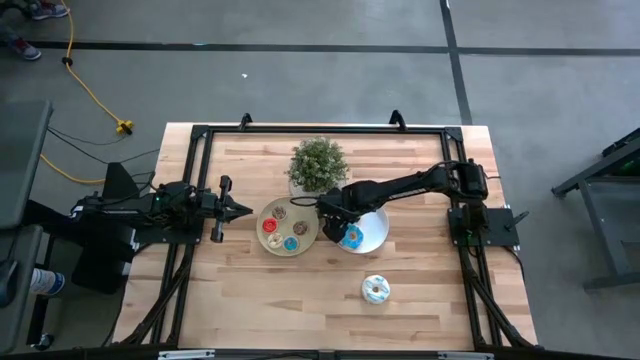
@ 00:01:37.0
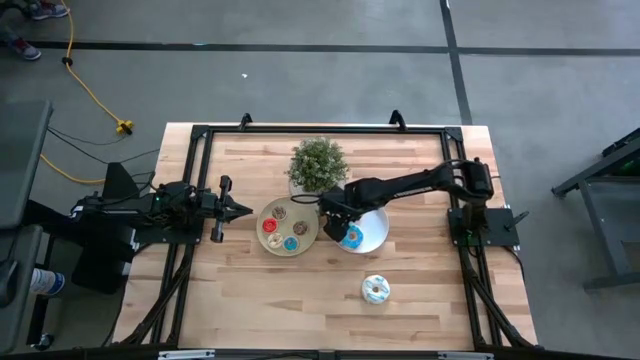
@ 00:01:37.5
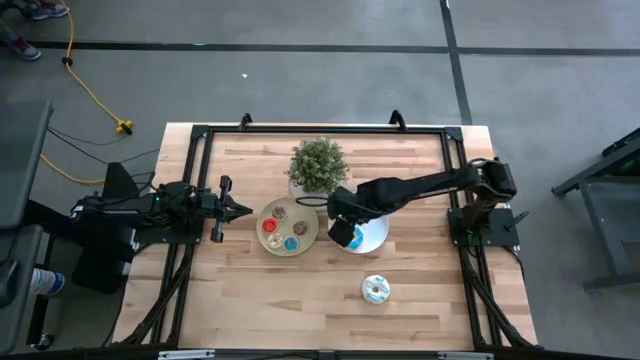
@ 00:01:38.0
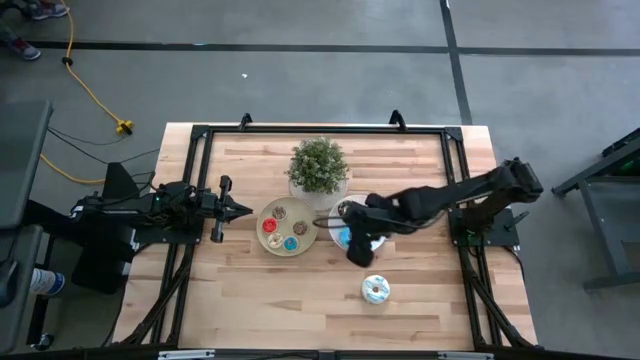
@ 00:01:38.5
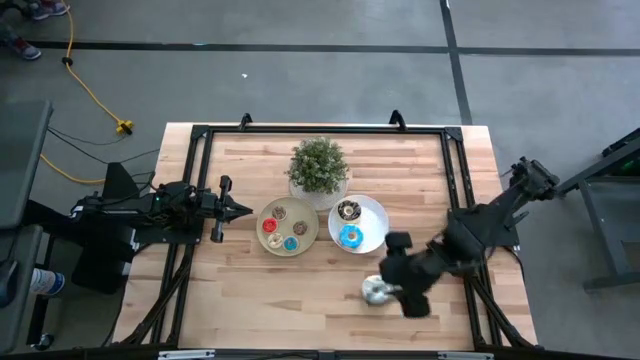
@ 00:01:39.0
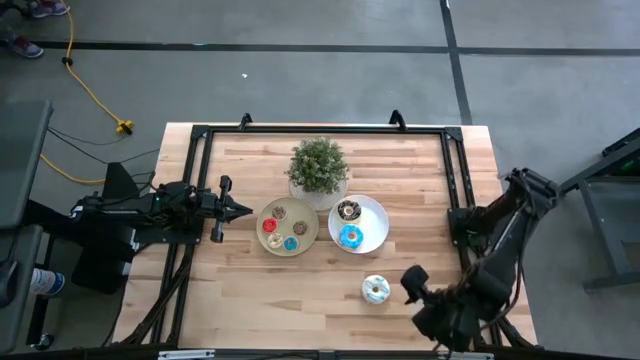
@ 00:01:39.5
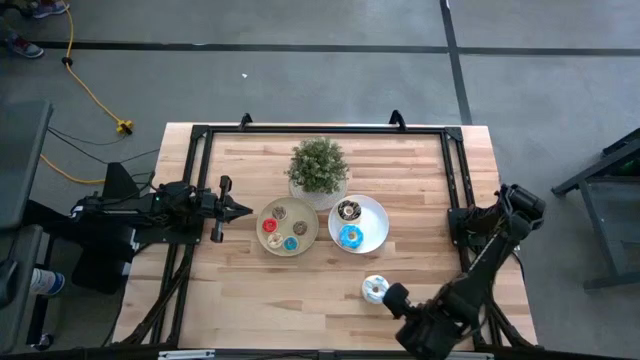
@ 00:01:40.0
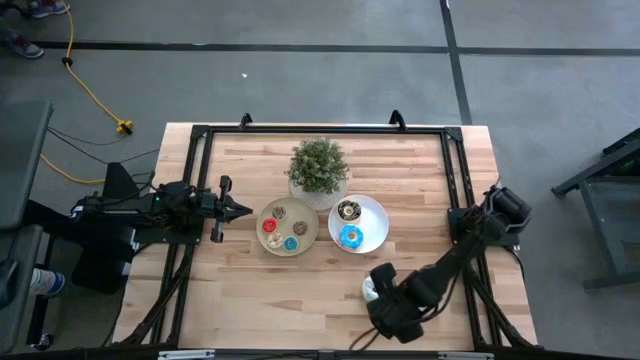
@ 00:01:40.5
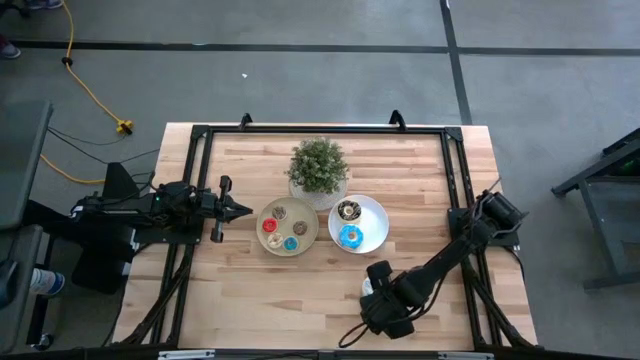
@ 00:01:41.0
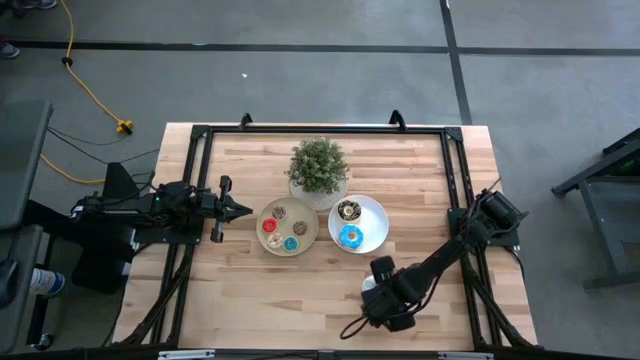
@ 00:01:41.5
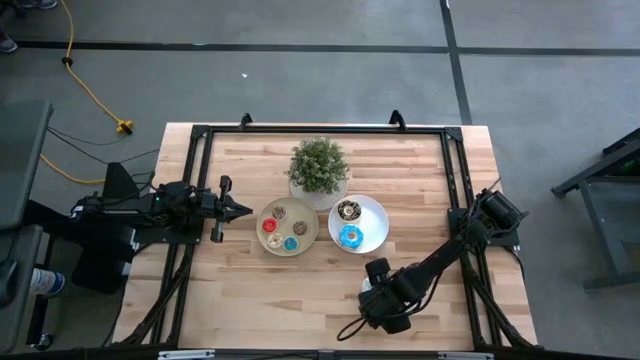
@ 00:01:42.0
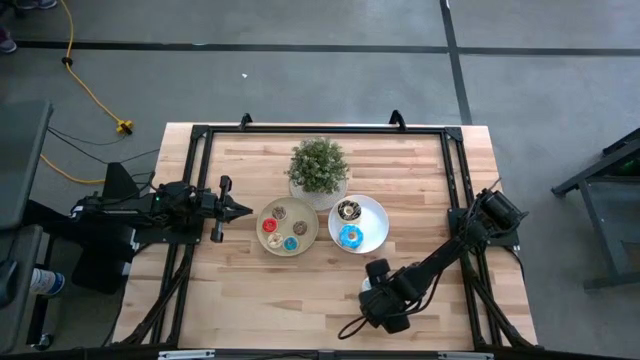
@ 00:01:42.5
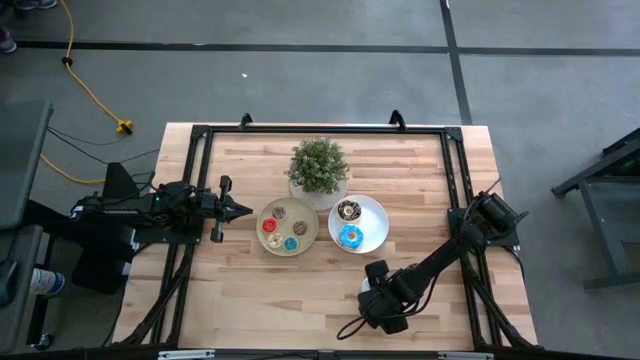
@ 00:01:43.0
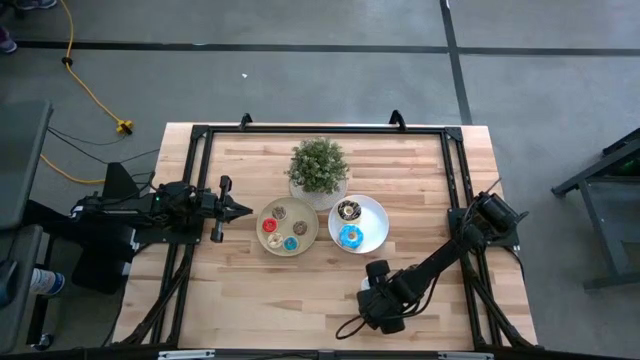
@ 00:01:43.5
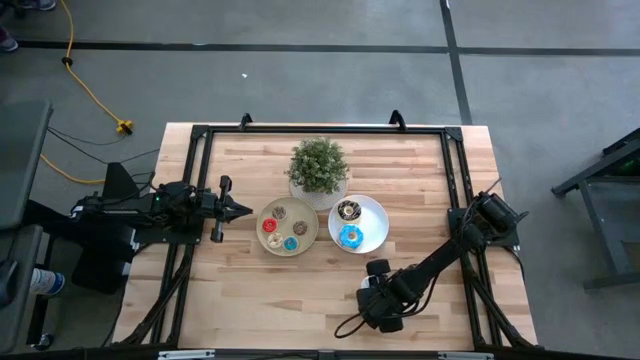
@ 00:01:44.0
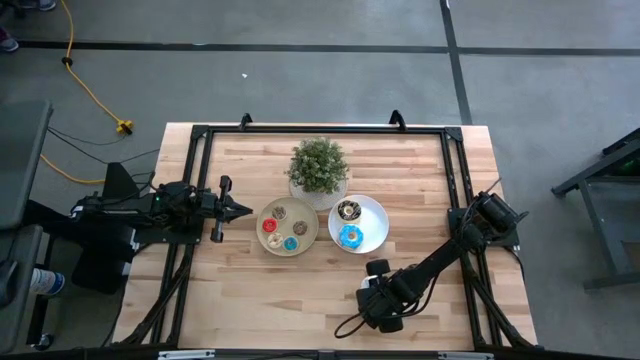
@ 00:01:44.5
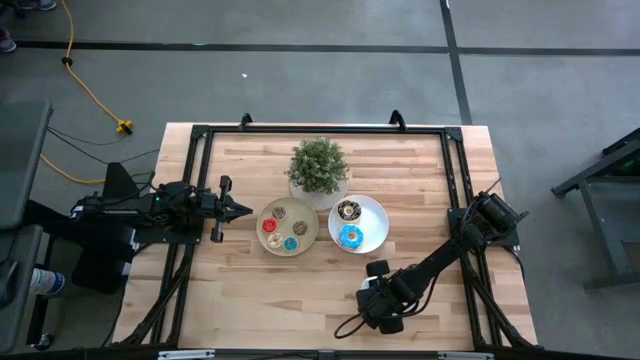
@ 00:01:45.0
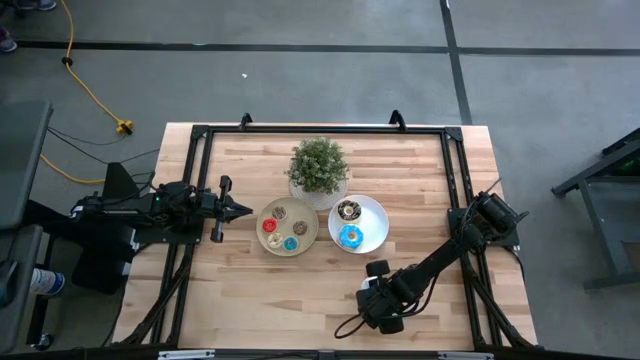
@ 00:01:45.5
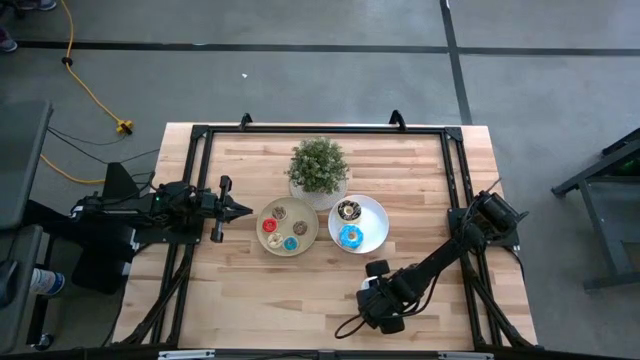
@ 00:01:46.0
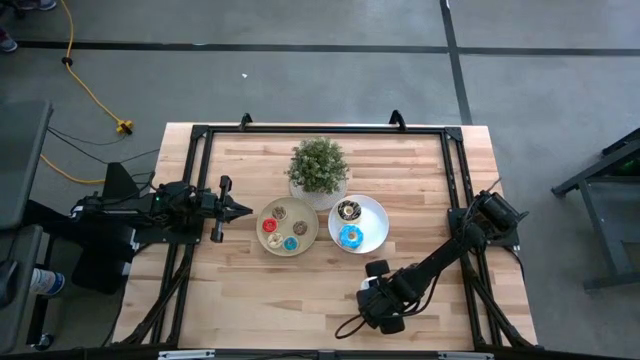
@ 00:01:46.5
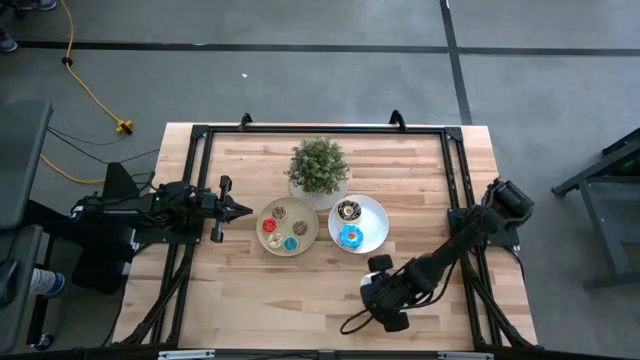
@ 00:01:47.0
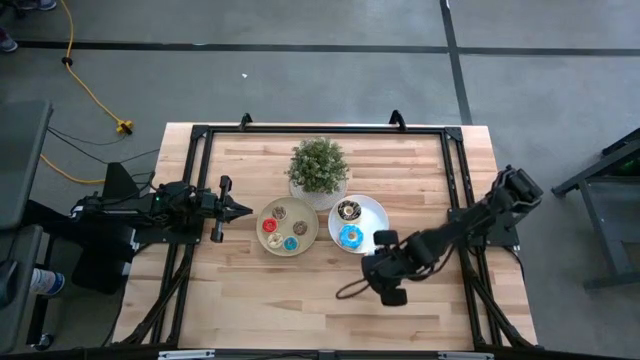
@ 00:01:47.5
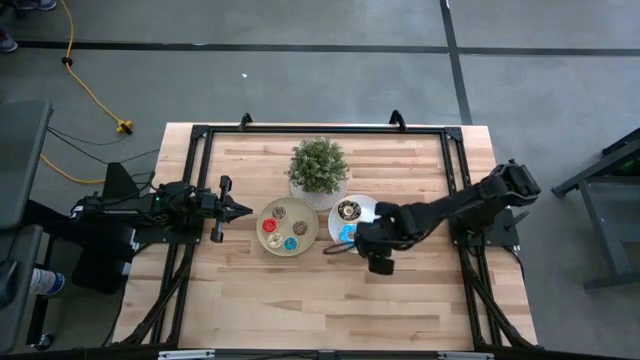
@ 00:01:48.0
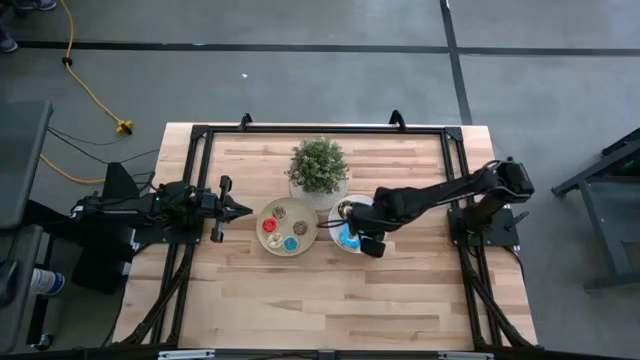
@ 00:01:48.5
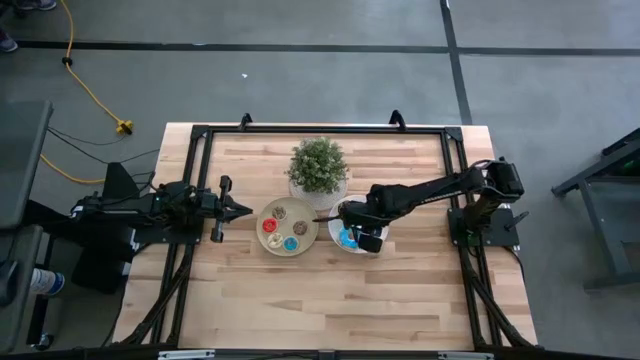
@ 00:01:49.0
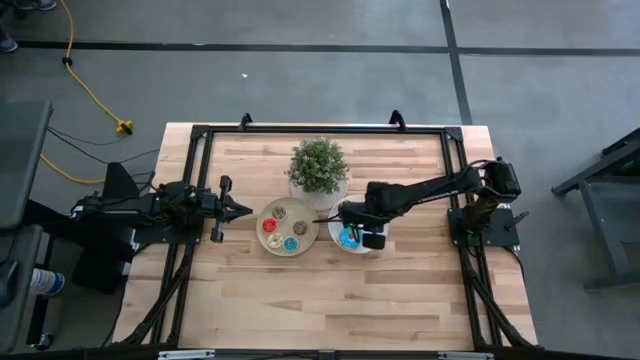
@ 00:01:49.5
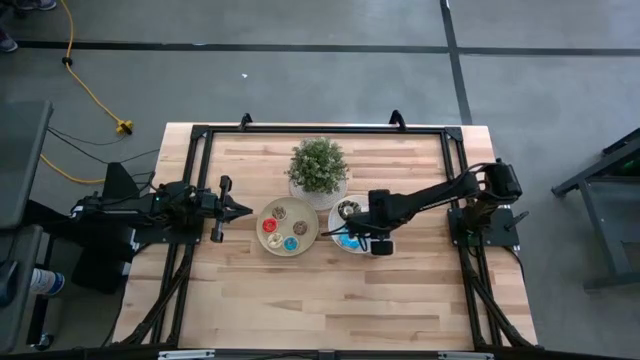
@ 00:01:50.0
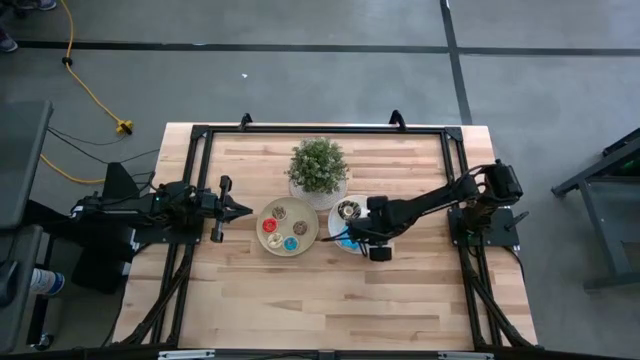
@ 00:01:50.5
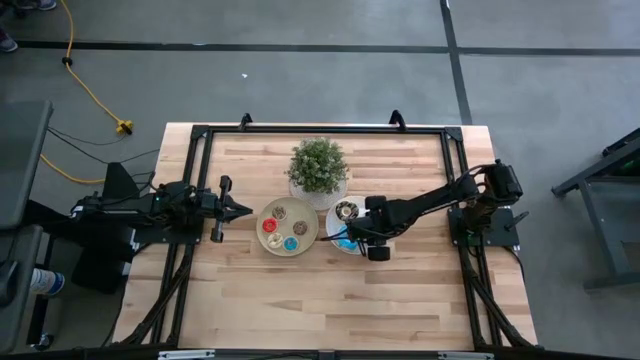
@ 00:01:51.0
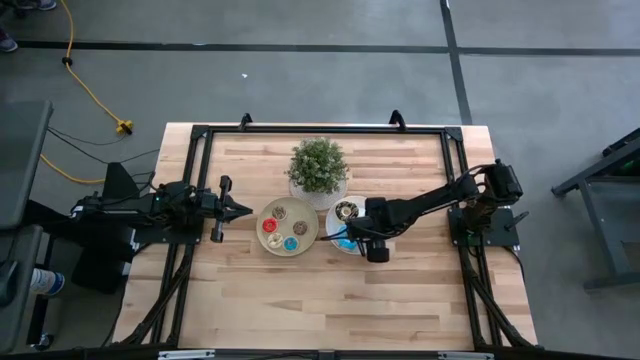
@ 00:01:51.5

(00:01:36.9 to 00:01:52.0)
Task: Pick & Place donuts
Put the large white donut on the white plate

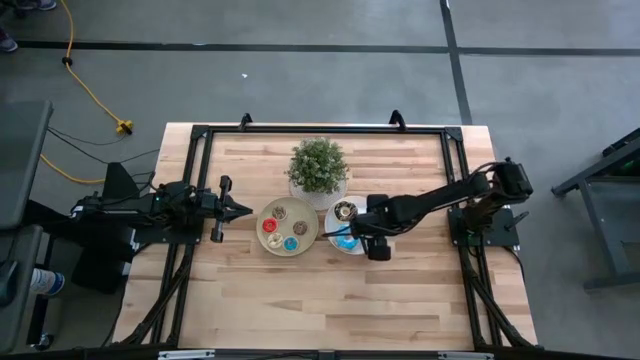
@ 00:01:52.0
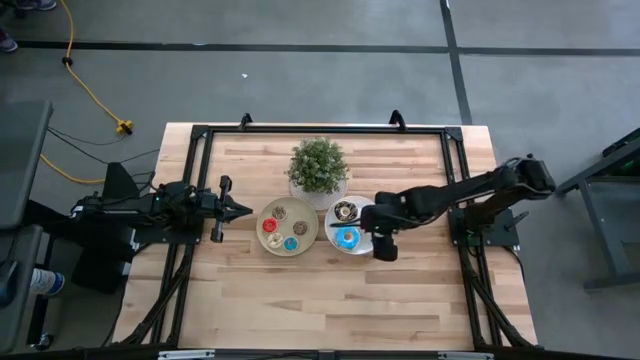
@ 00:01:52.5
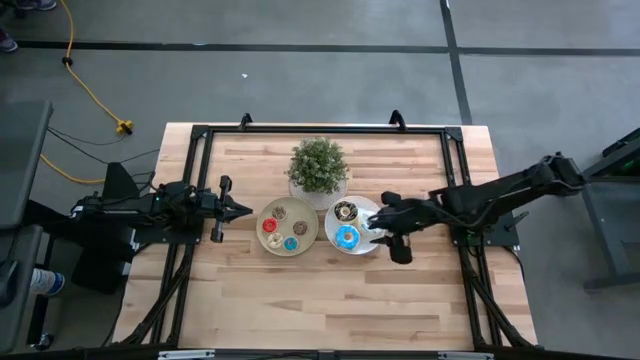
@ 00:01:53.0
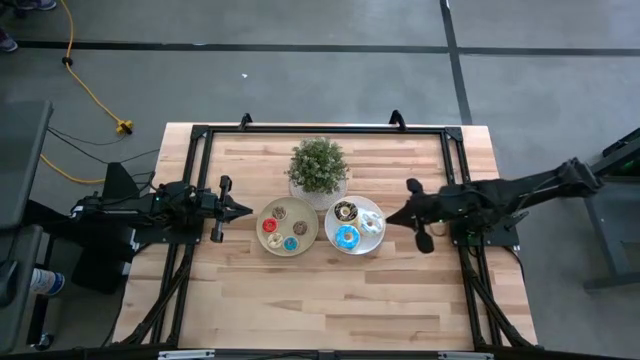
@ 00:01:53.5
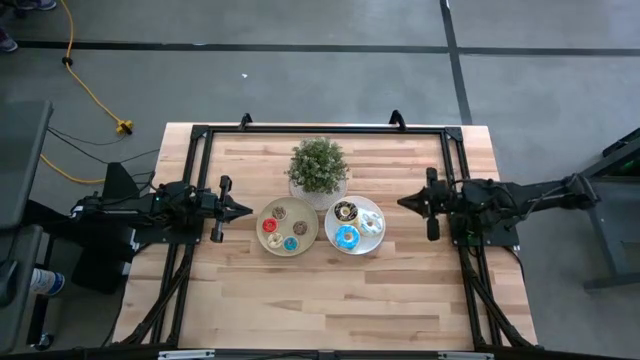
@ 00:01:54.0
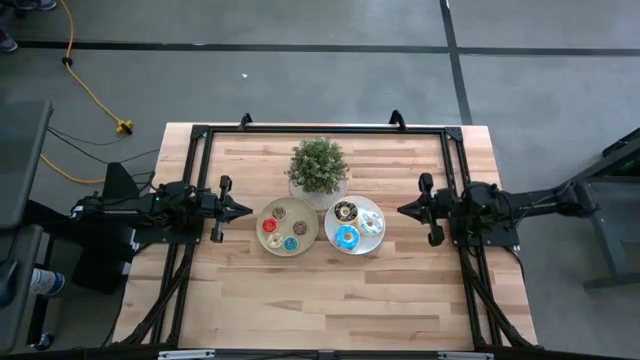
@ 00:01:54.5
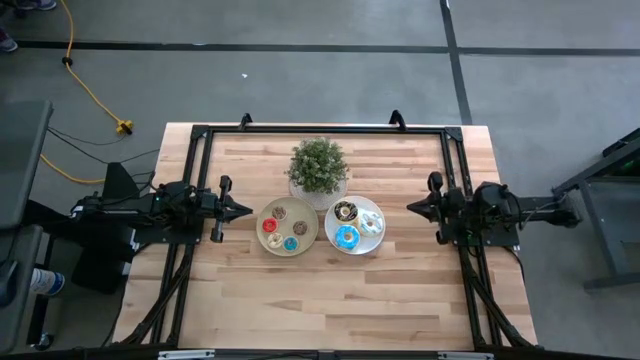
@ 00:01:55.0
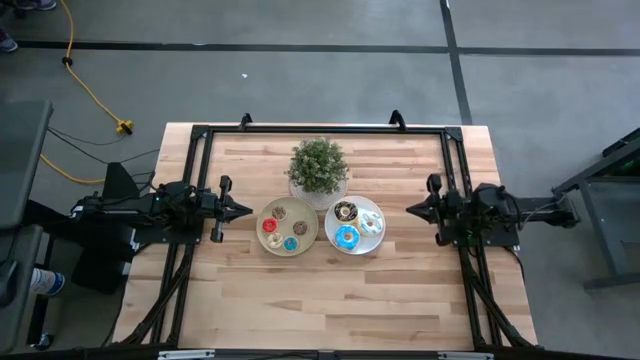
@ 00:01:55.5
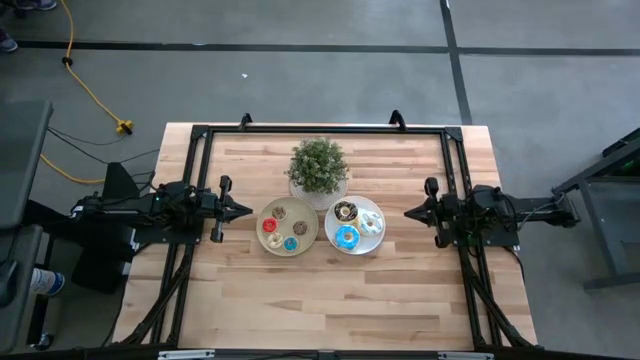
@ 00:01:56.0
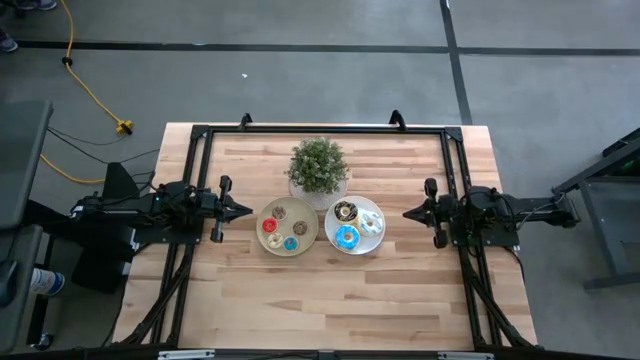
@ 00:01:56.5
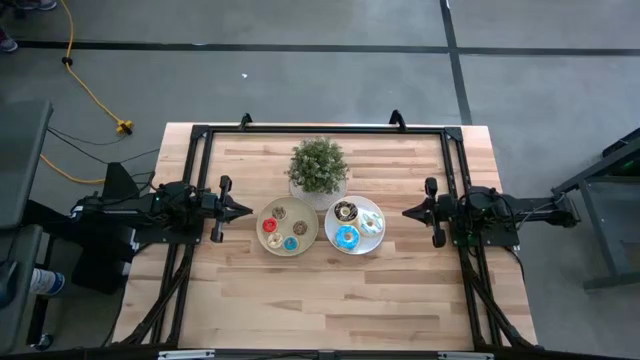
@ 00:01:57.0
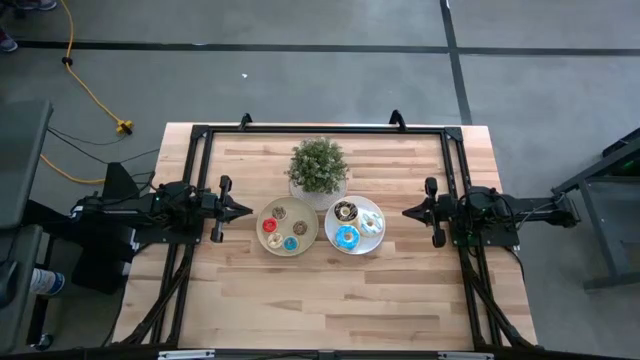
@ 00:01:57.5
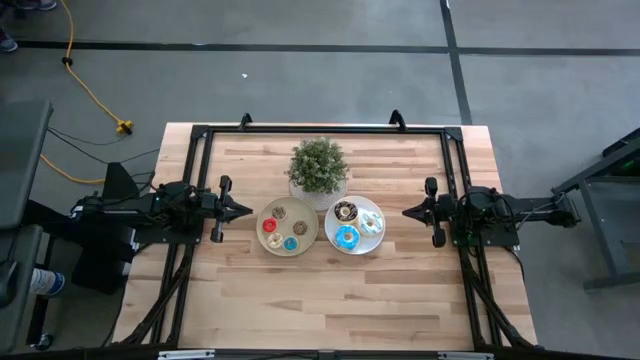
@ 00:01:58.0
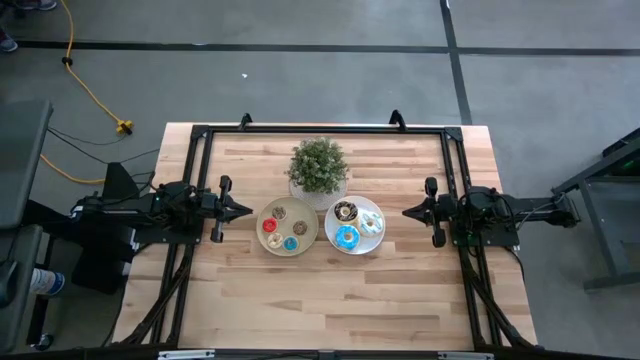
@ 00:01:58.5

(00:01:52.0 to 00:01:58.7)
Return to Home Position
